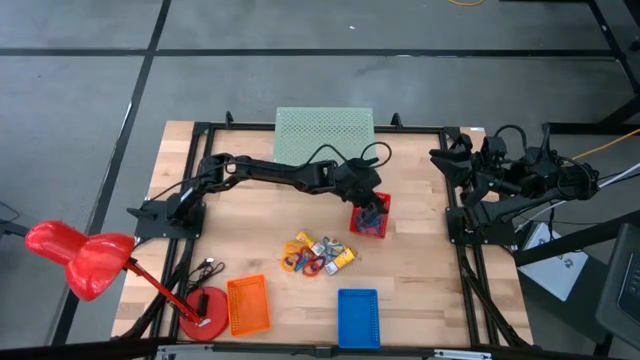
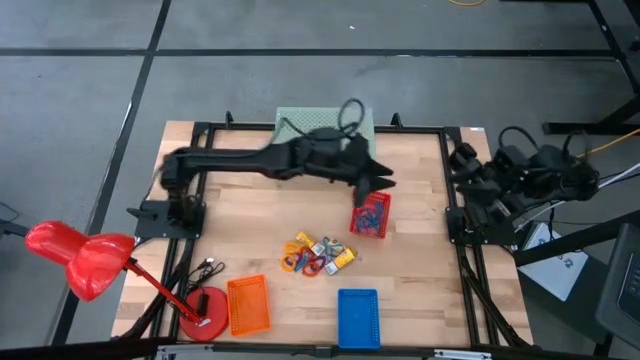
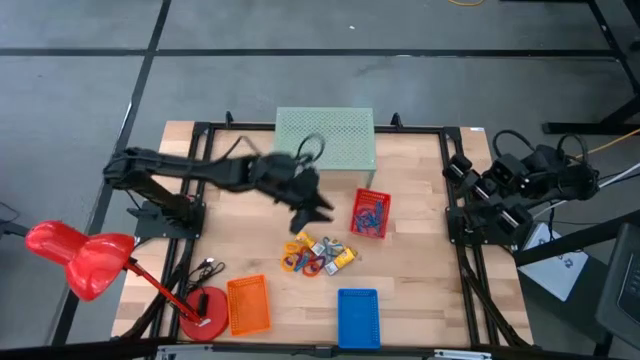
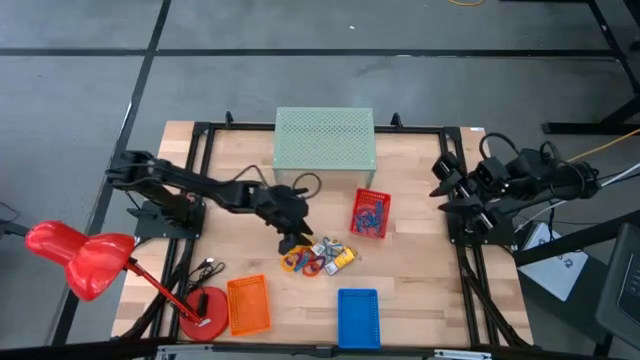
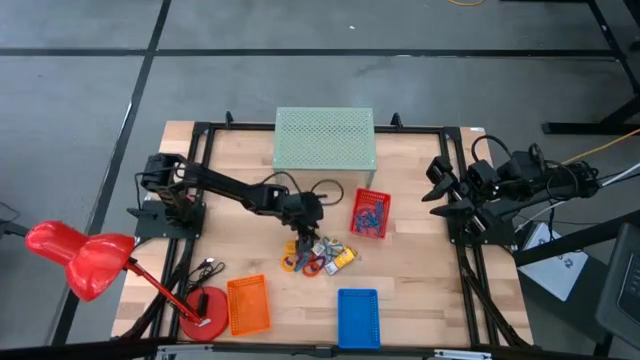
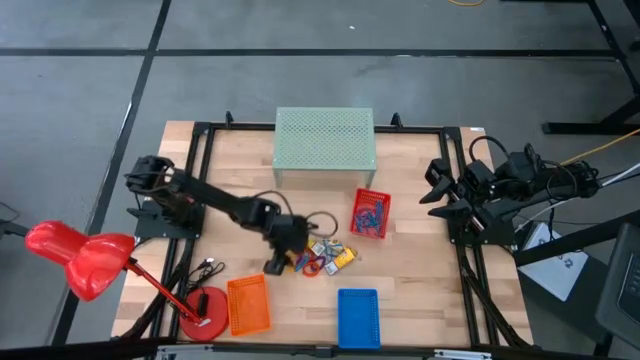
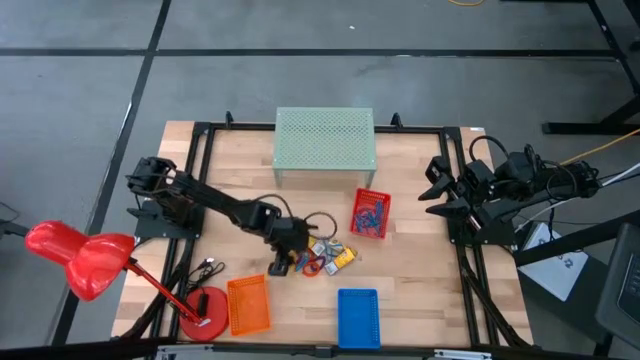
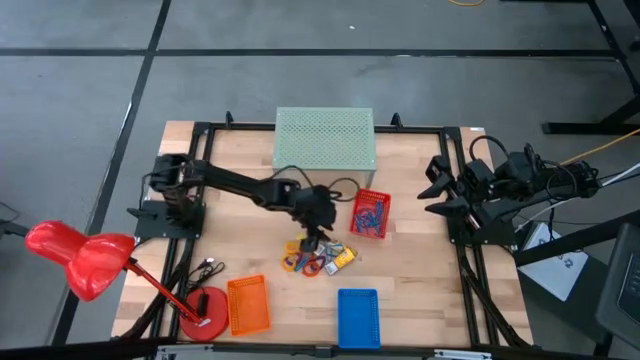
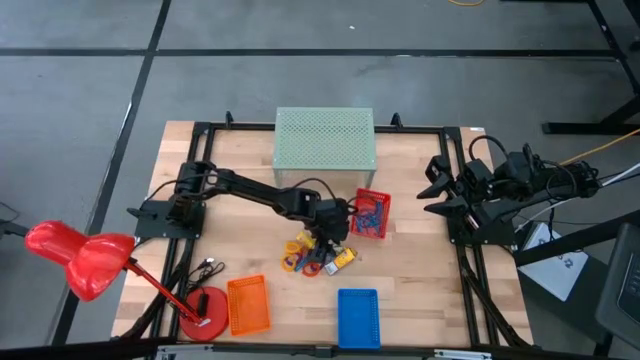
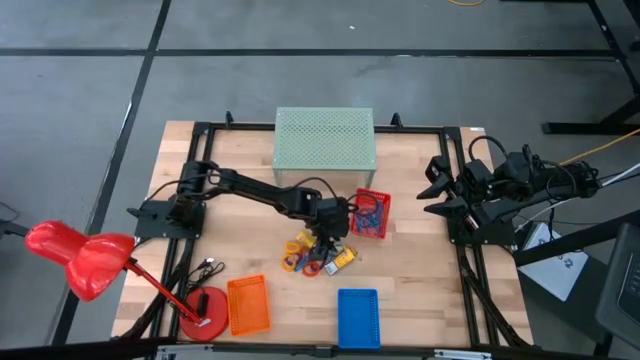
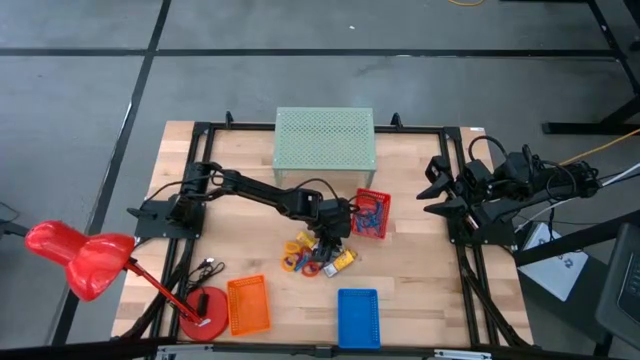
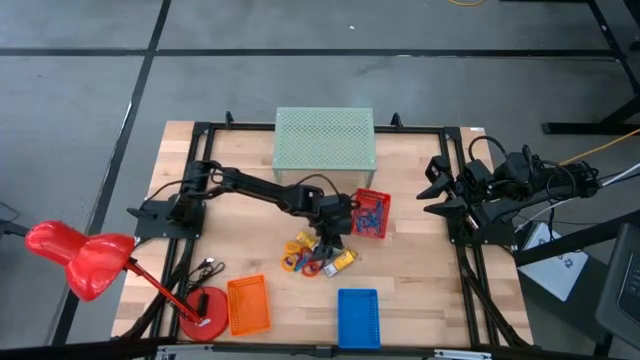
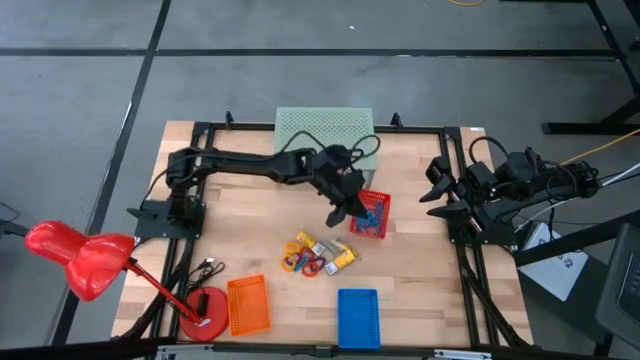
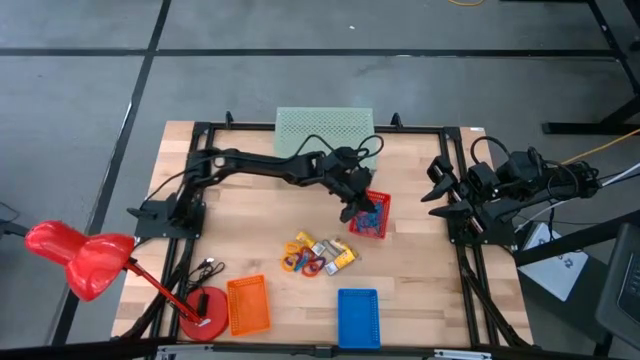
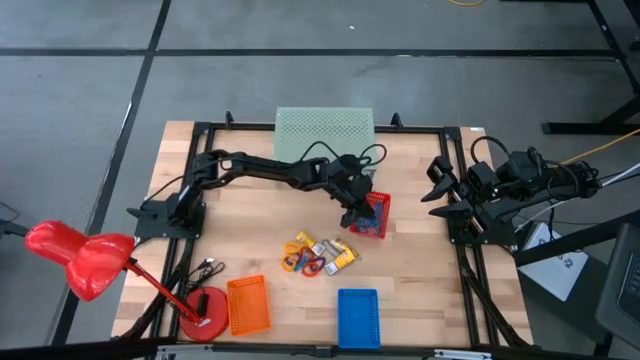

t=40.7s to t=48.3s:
Task: Pick & Place Office Desk Supplies
Put the blue rubber band into the red basket

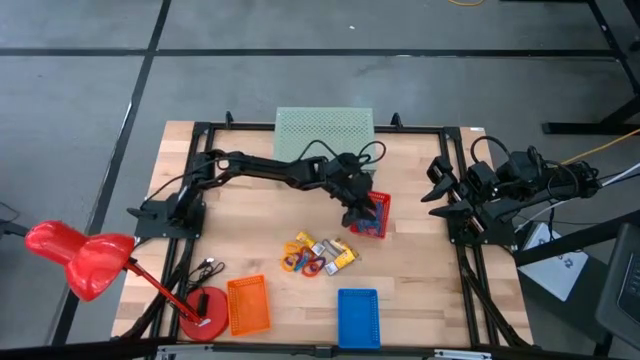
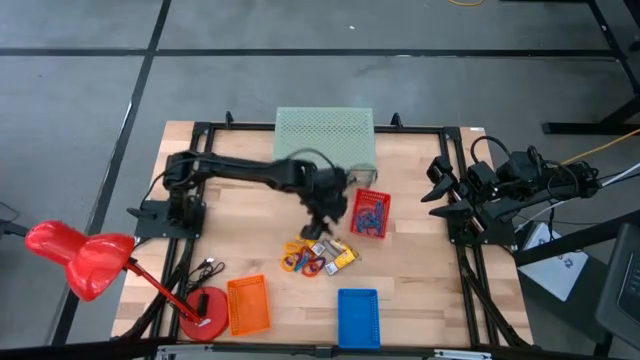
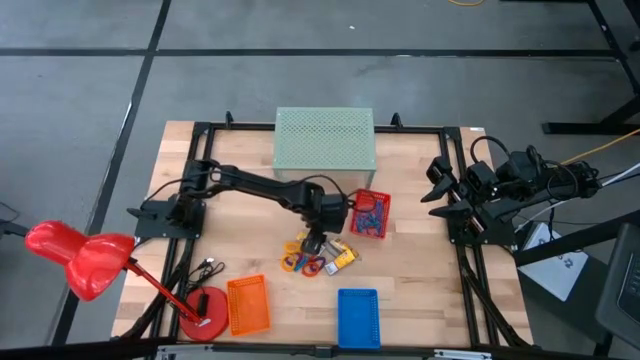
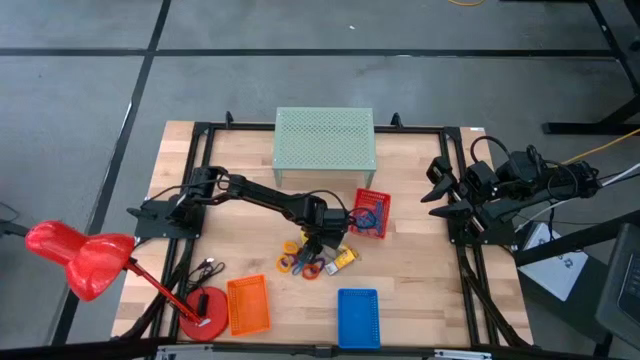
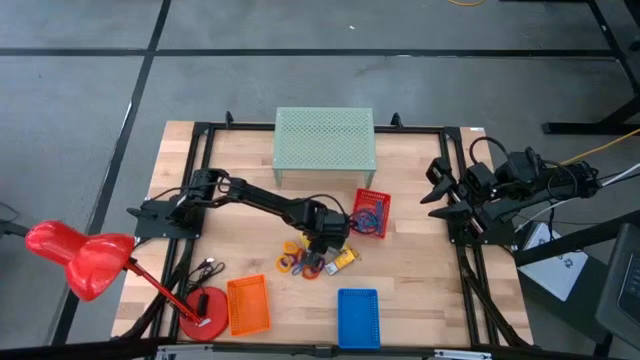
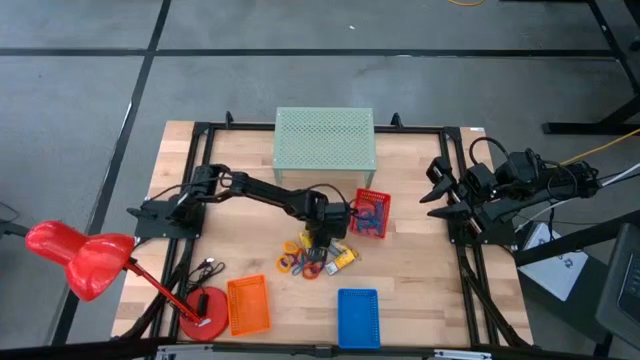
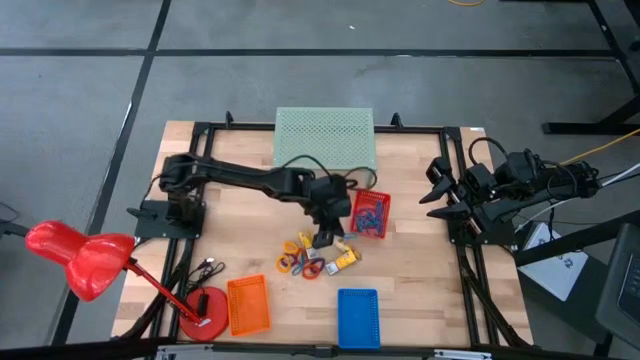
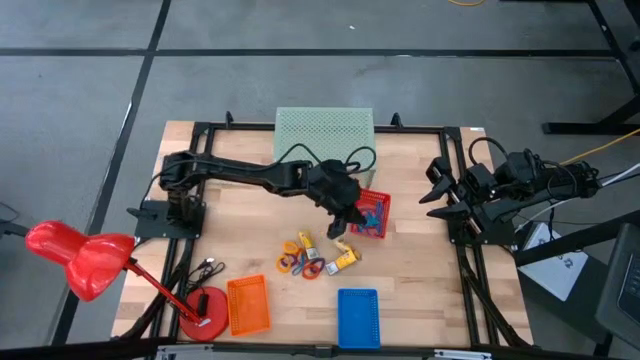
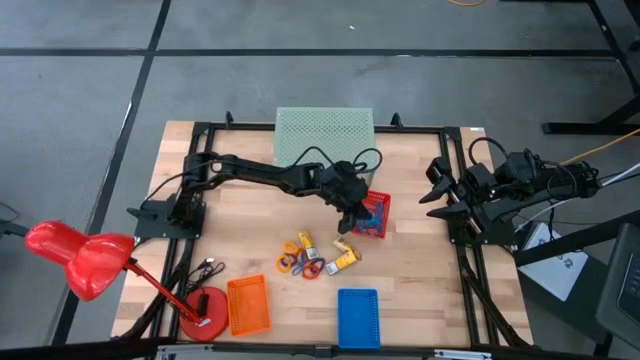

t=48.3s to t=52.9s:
Put the blue rubber band into the red basket

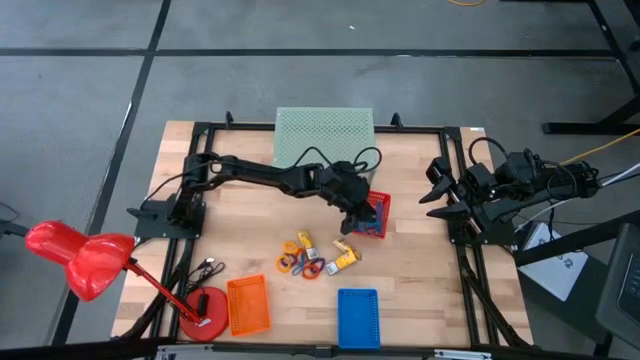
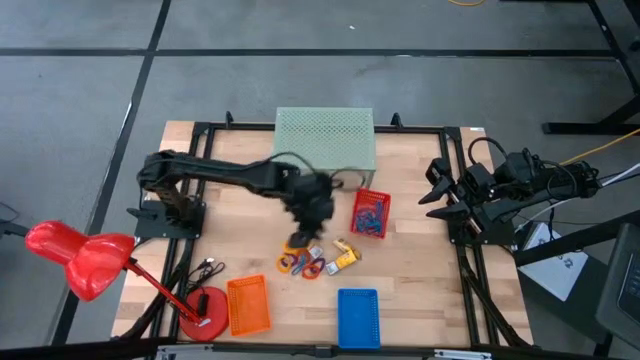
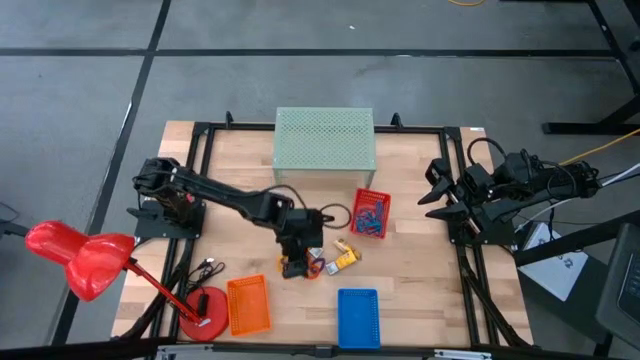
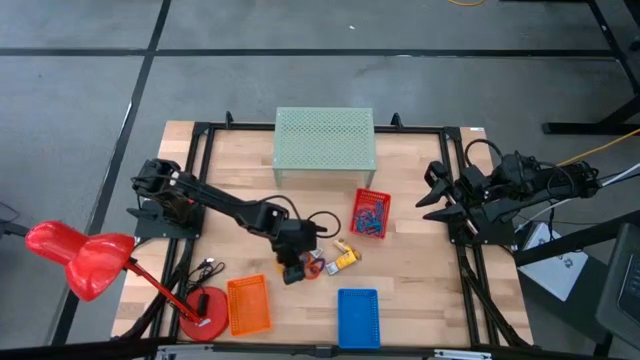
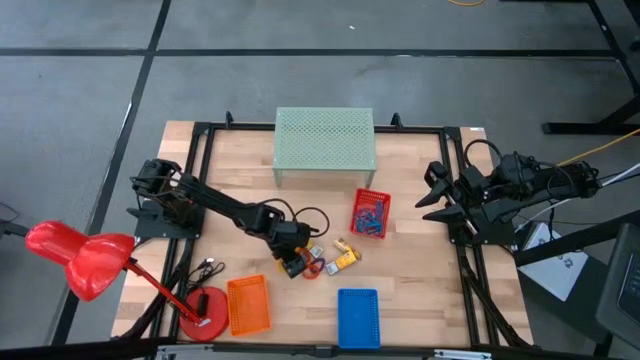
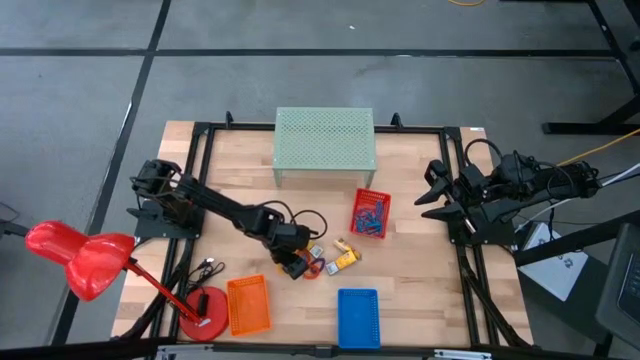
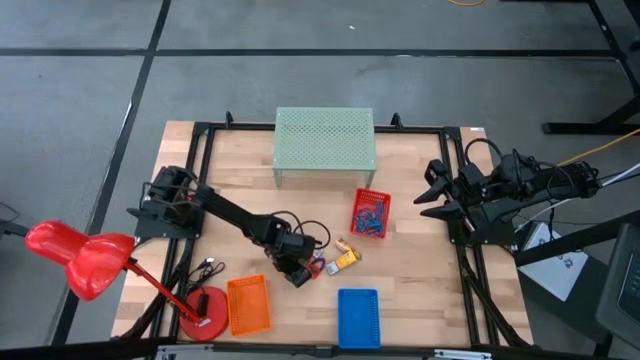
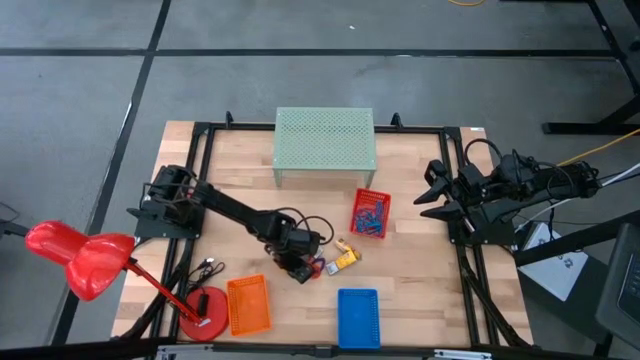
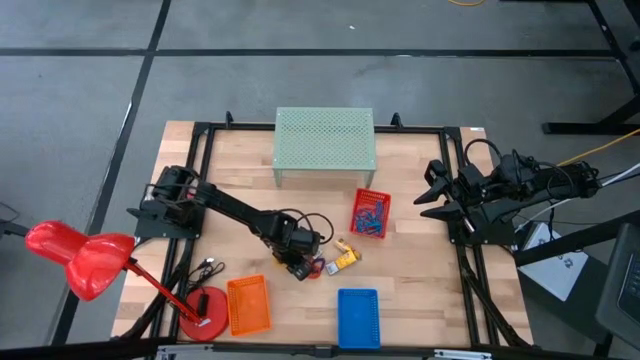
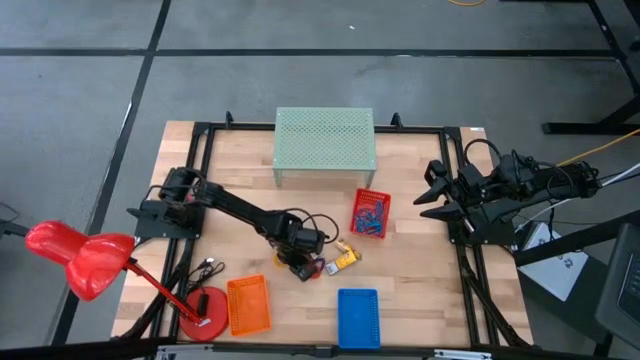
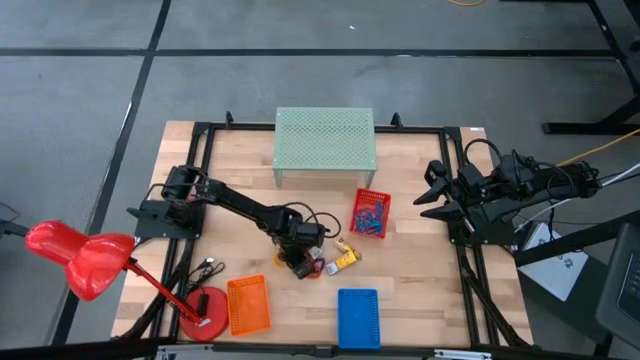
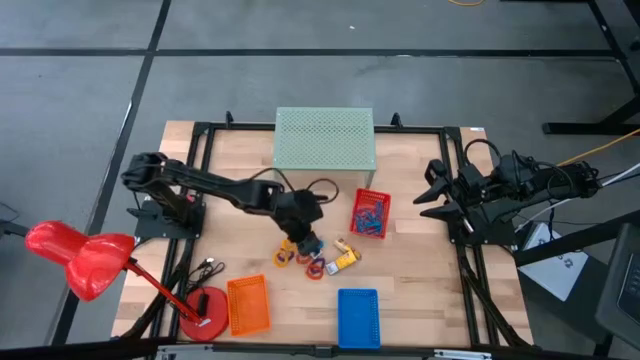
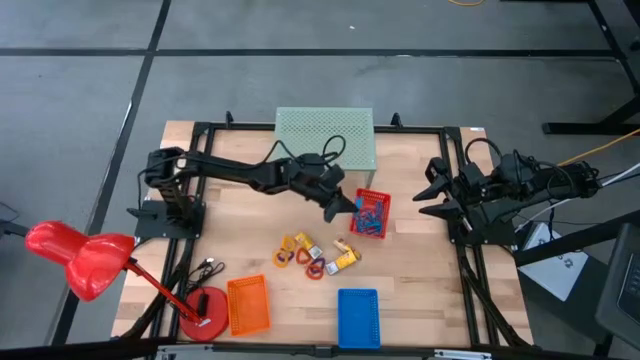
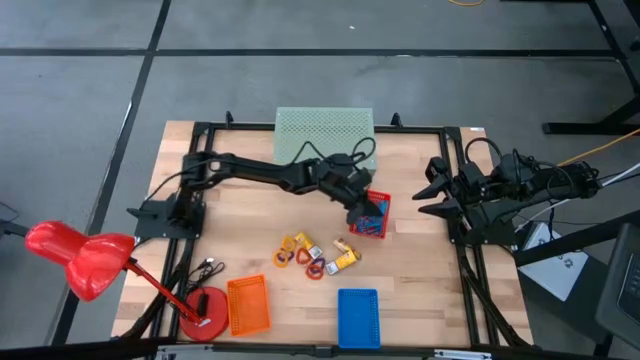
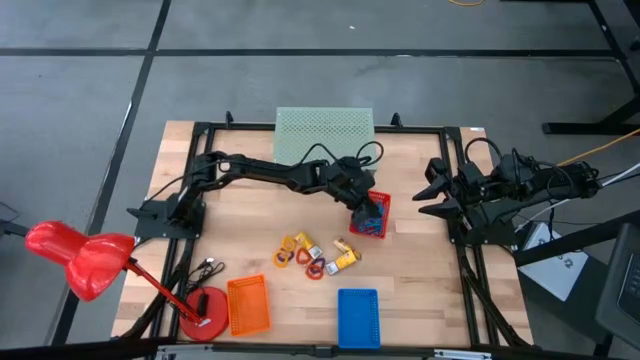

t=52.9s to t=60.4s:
Put the blue rubber band into the red basket

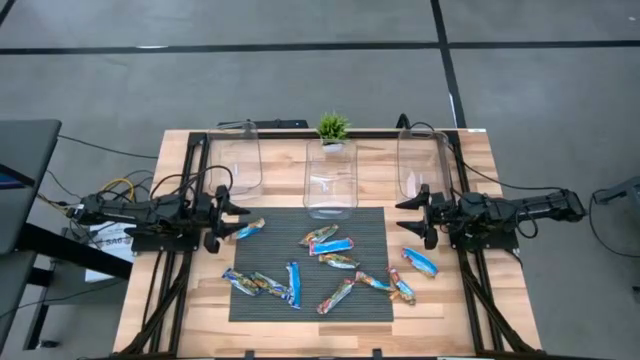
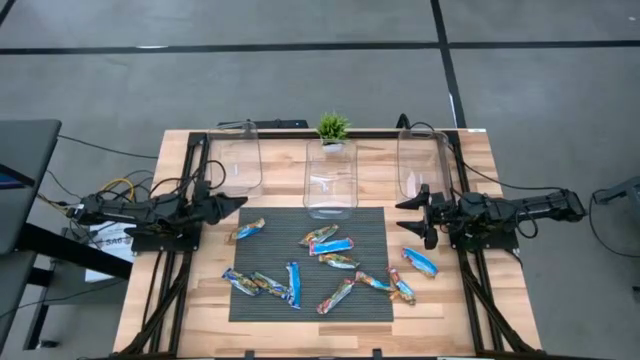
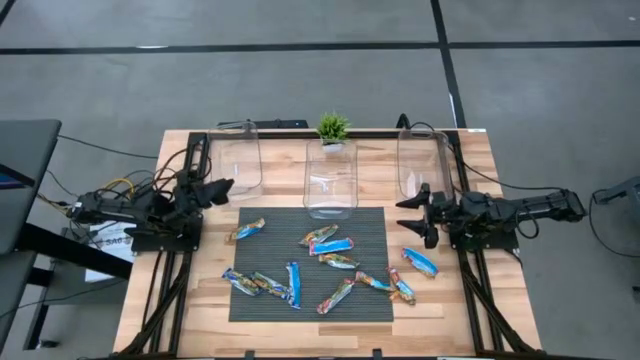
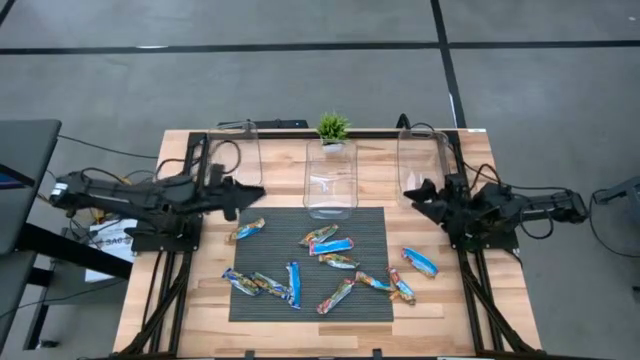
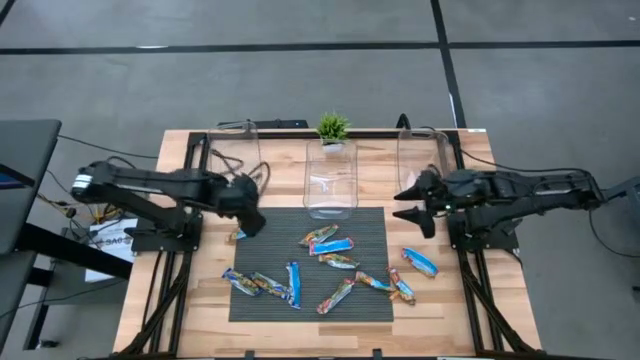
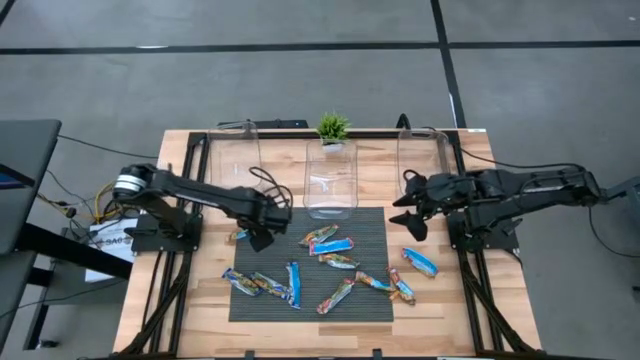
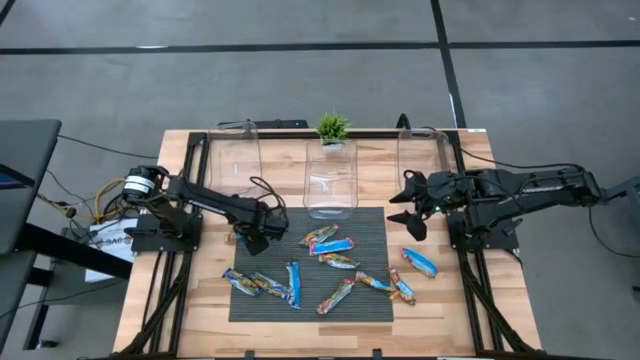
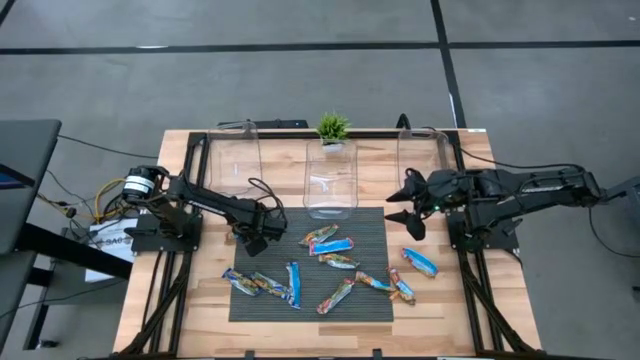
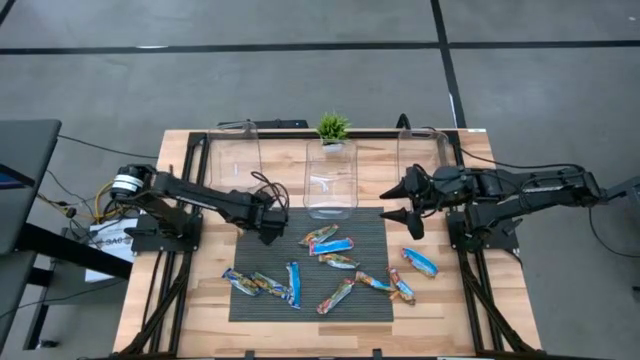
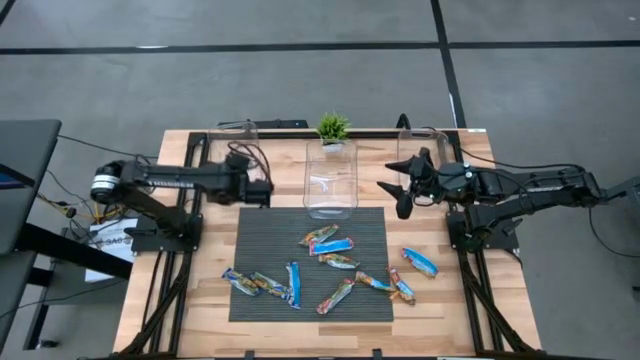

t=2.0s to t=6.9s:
Task: Pick and place Granola Bars by type
Put the yellow granola bar into the left transparent bin
